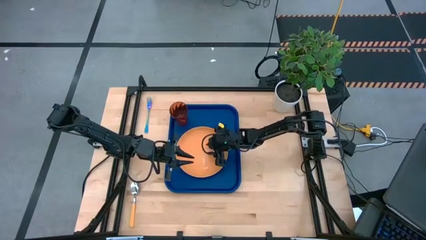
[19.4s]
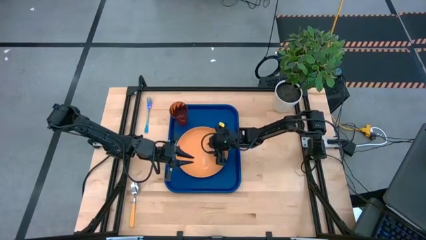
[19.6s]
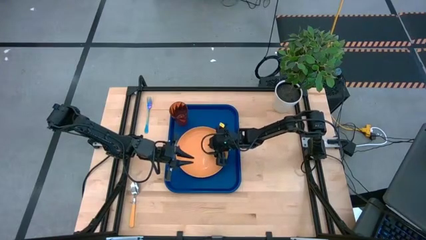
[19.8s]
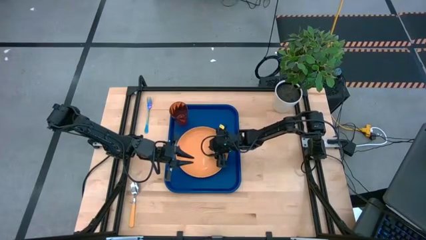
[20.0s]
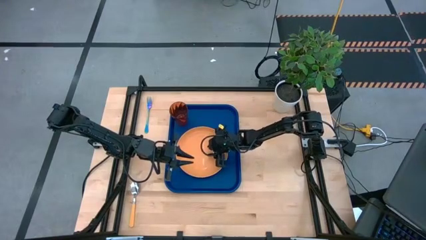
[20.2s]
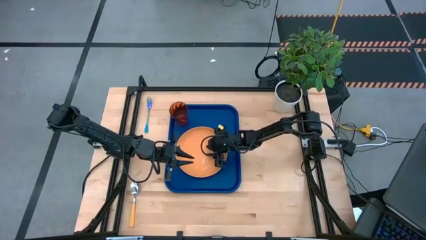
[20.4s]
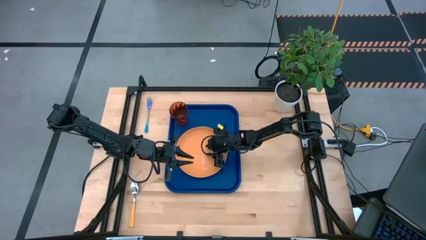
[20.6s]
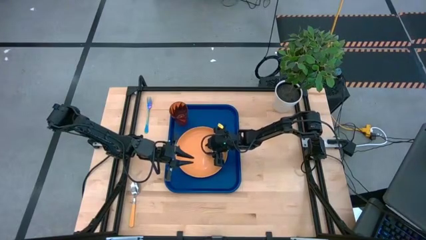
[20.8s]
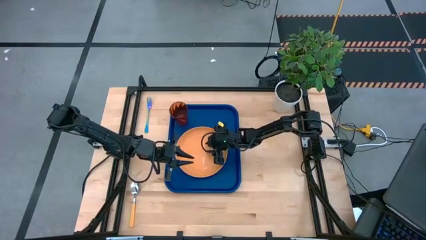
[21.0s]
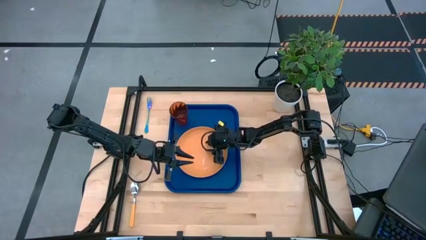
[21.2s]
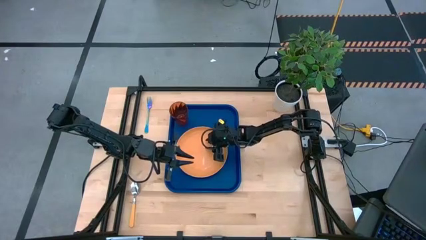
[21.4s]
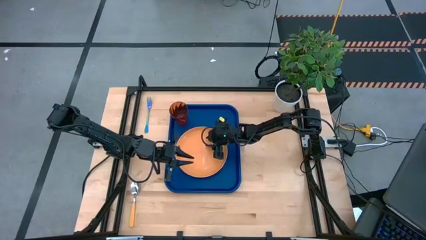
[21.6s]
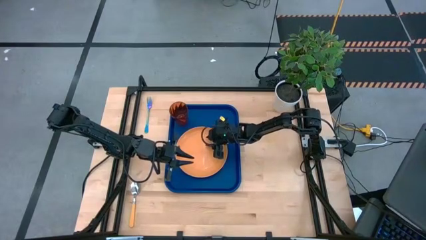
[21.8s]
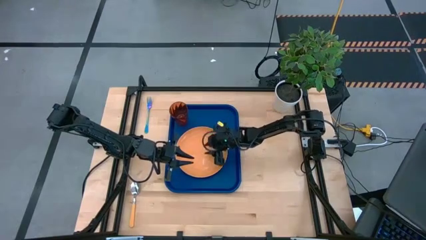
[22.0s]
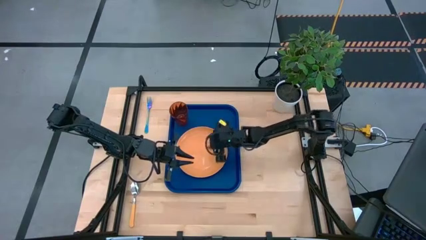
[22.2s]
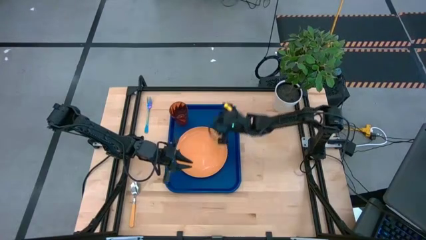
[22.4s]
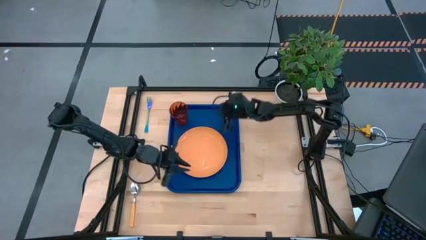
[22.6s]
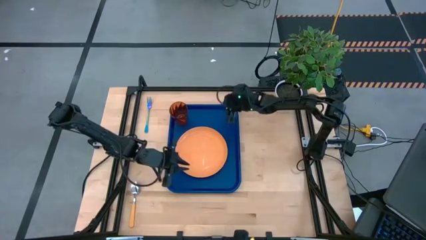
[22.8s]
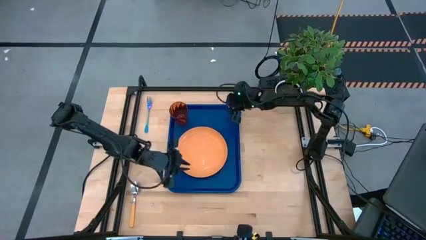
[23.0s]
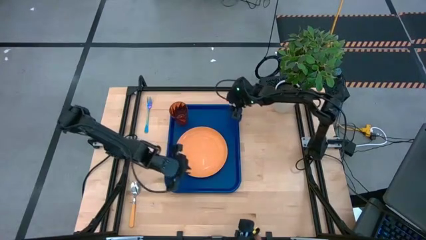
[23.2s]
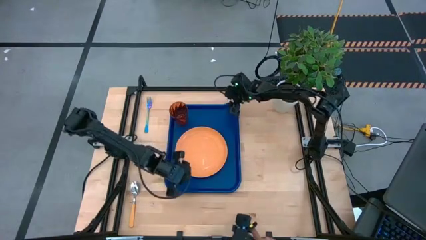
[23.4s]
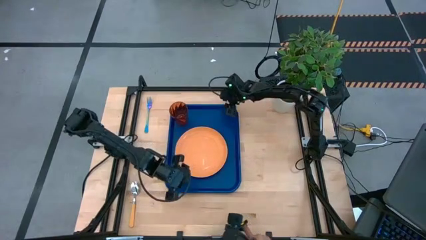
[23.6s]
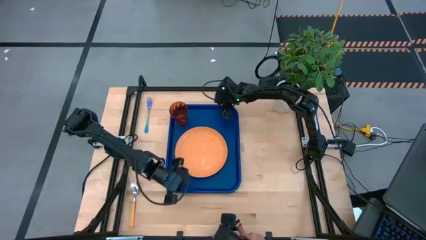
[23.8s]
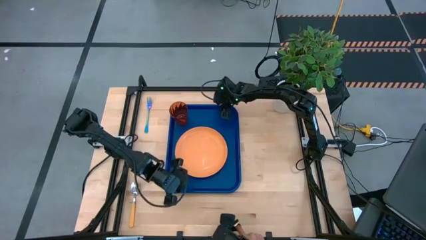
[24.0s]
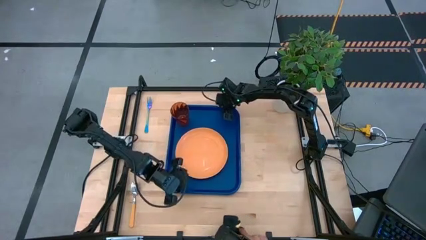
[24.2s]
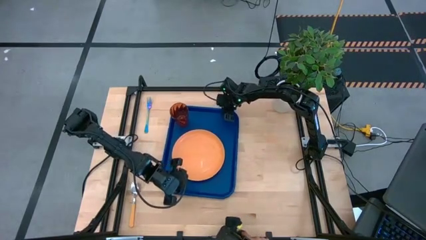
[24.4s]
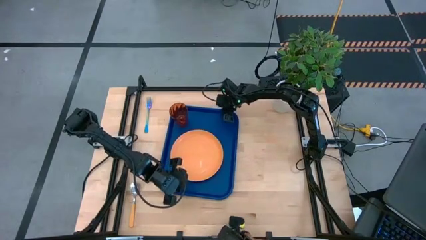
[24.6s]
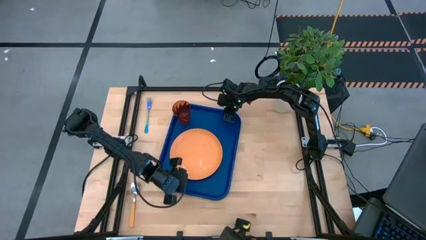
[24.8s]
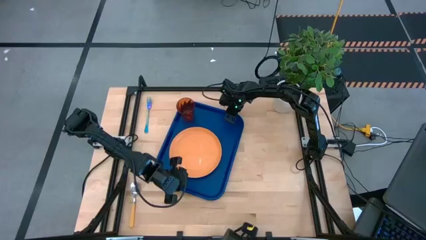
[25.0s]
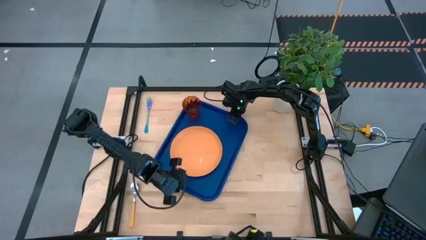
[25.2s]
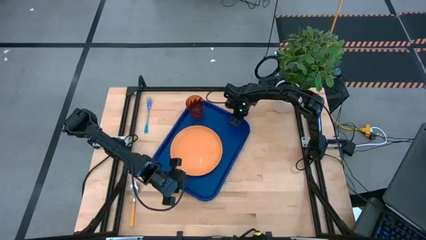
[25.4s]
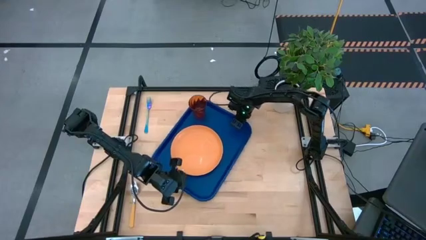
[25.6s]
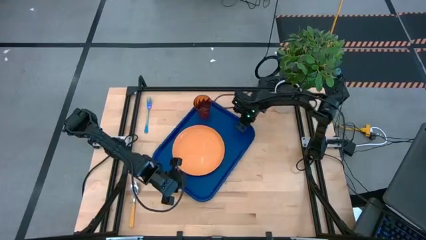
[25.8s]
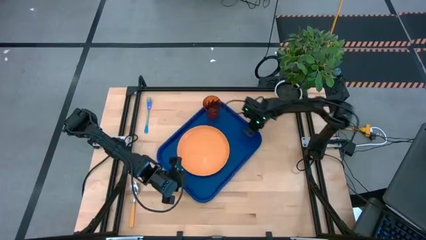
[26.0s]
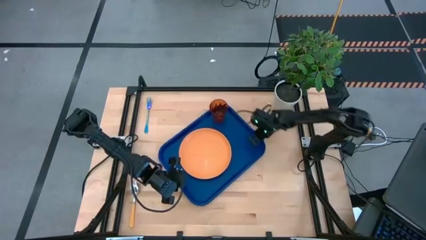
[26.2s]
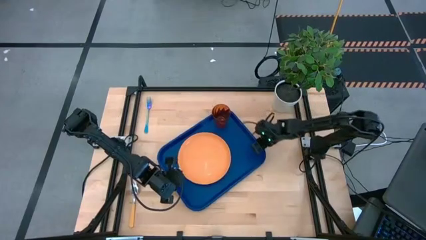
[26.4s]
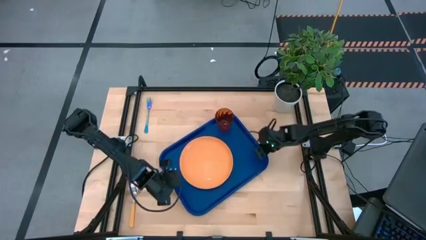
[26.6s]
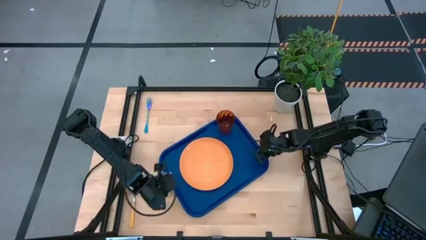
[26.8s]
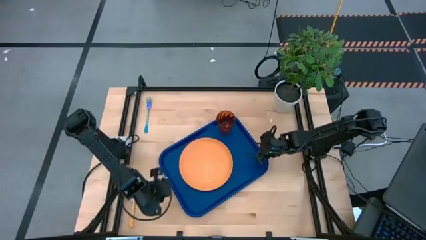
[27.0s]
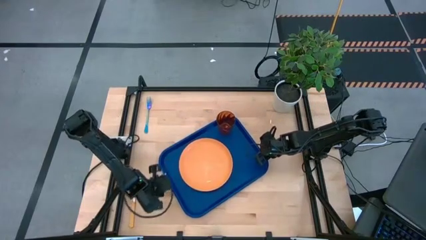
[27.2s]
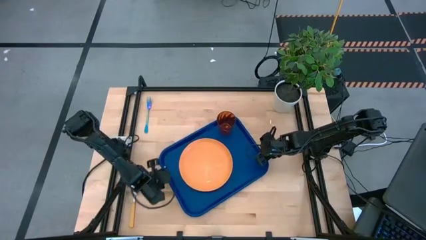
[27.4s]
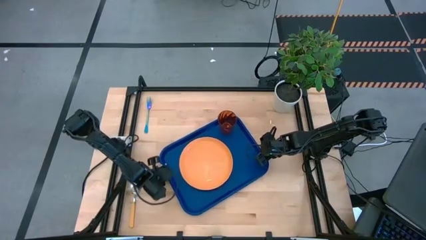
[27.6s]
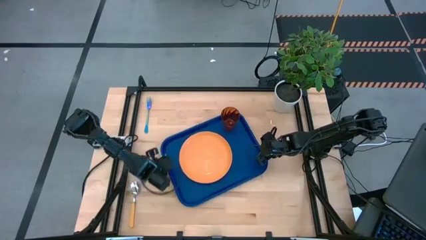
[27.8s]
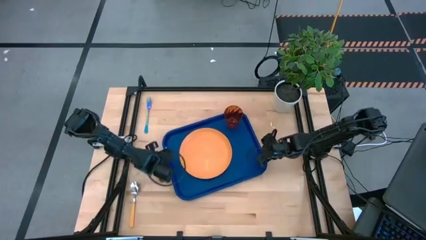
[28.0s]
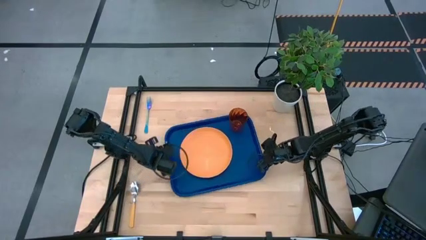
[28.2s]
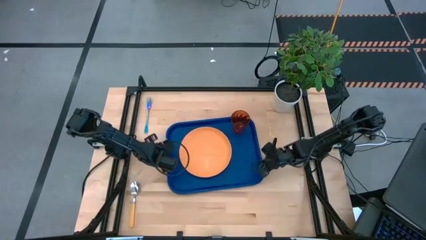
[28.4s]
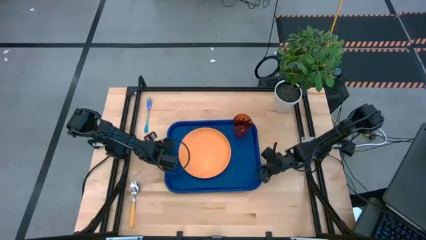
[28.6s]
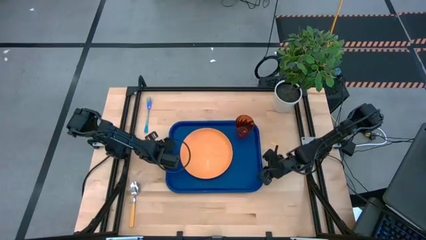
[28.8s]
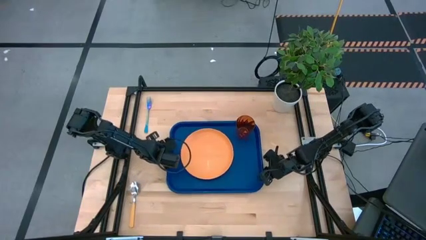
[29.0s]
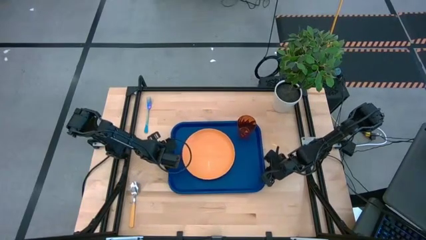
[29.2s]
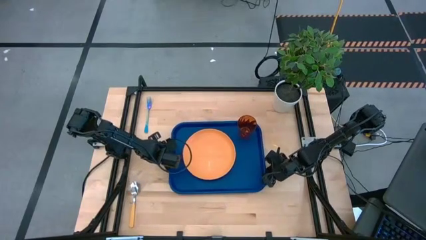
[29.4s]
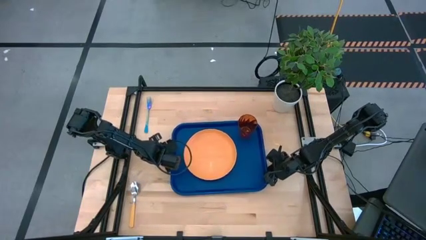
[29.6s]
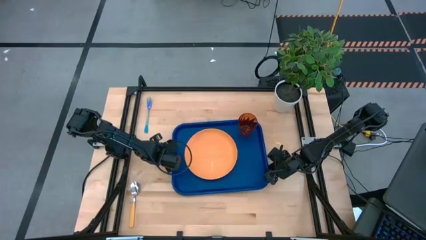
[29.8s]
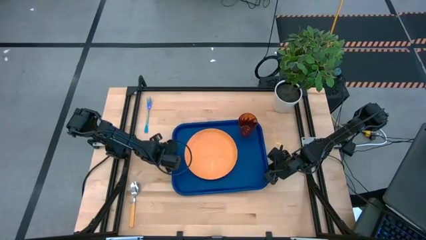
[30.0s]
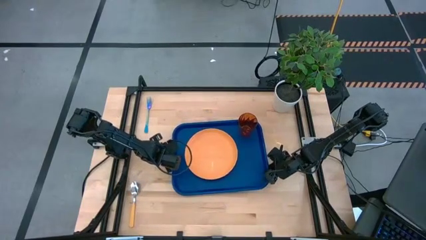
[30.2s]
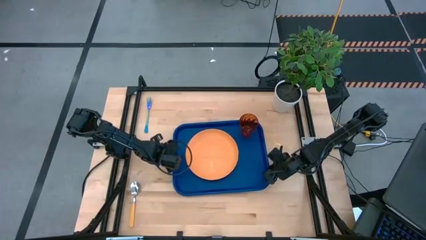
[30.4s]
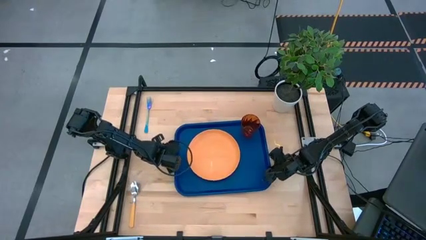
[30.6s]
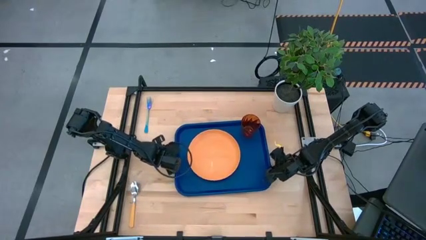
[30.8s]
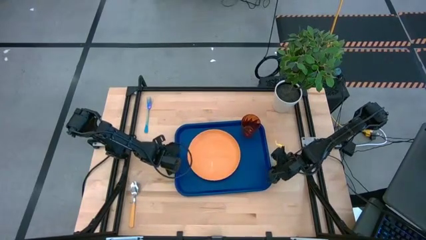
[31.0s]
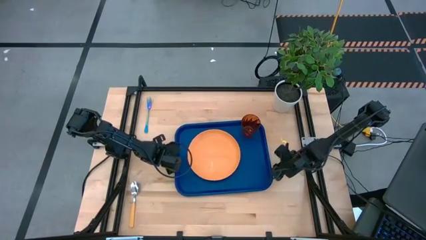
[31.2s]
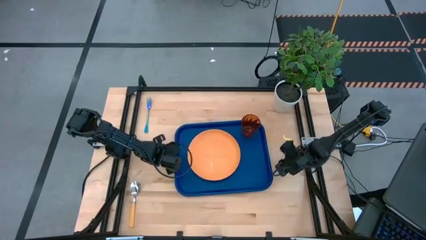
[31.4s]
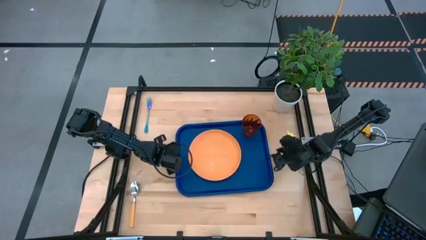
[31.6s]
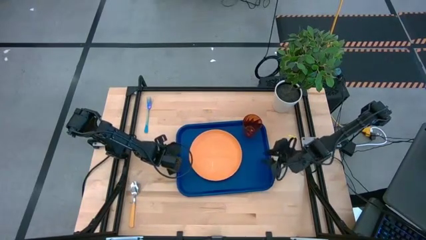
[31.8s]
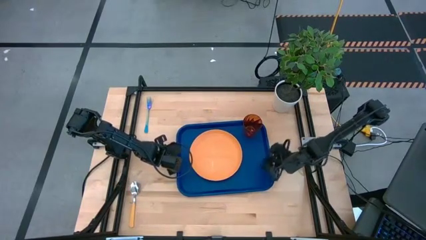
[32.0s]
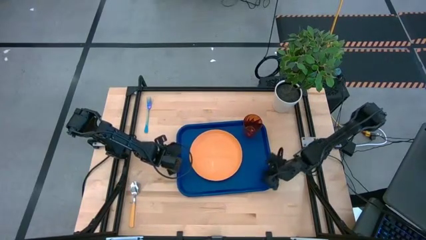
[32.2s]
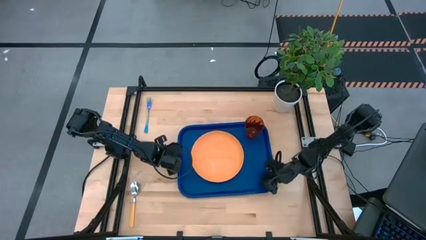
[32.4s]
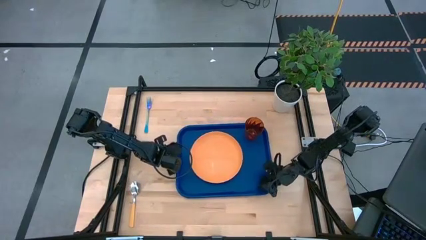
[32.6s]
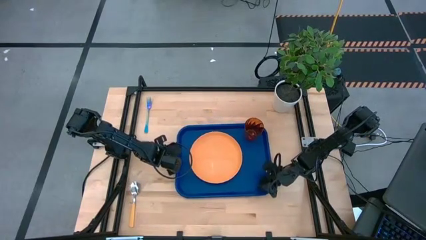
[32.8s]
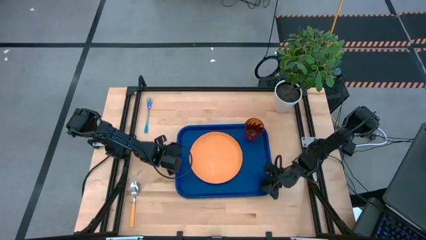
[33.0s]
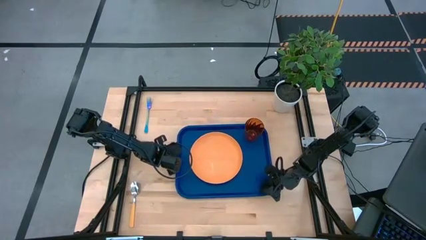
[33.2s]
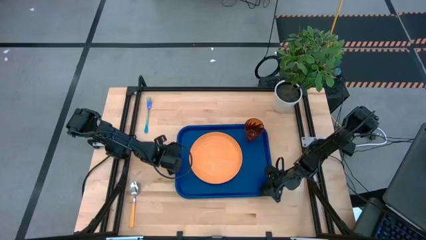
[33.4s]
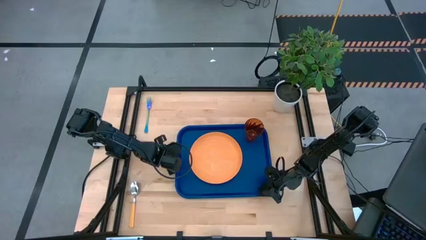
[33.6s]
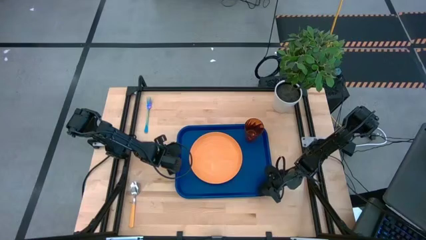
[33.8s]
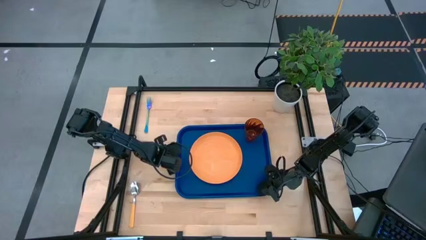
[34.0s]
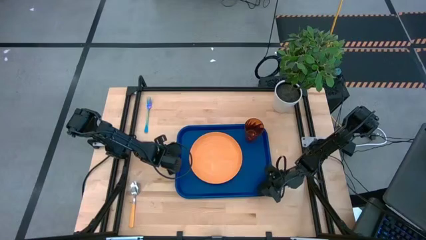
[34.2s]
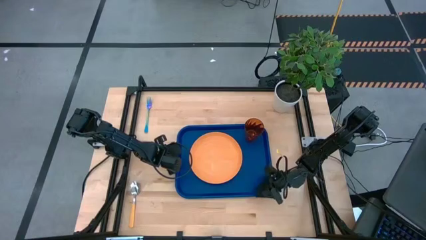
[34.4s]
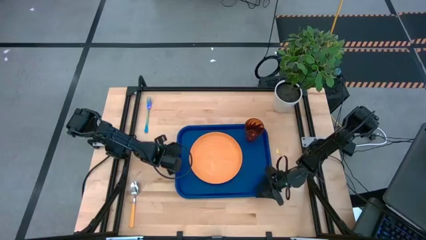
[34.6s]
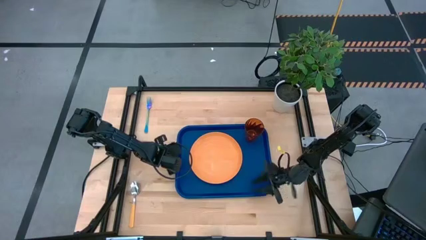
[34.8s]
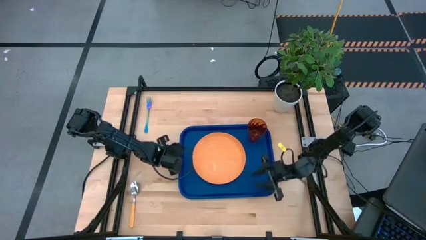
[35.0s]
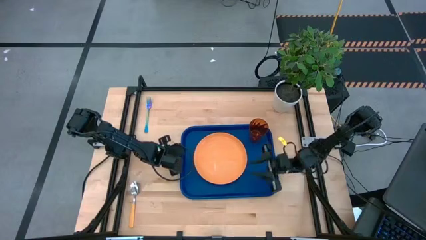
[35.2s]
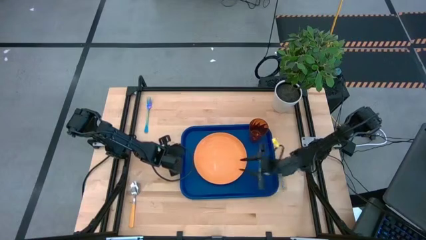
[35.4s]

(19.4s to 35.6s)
Task: Pick and place plate/cup/fork/spoon on tray
Adjust the blue tray

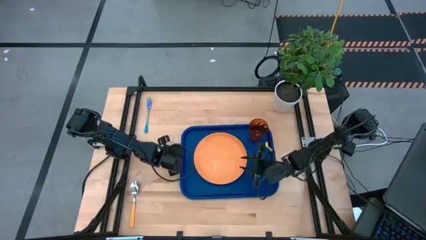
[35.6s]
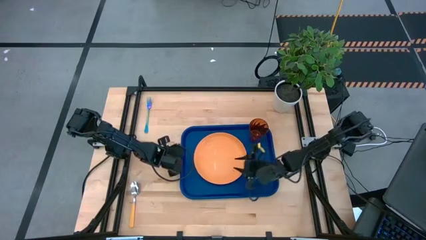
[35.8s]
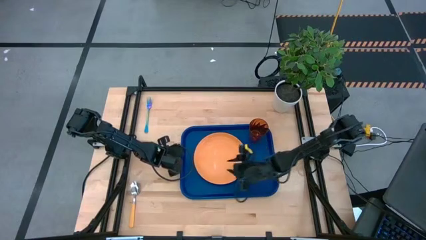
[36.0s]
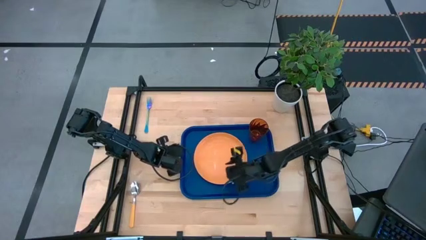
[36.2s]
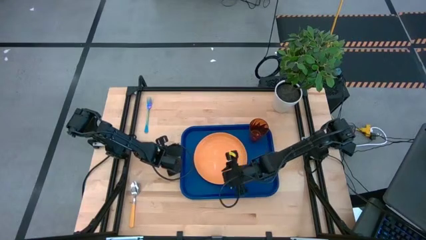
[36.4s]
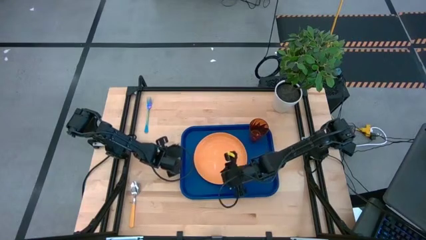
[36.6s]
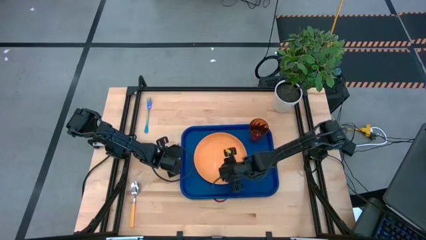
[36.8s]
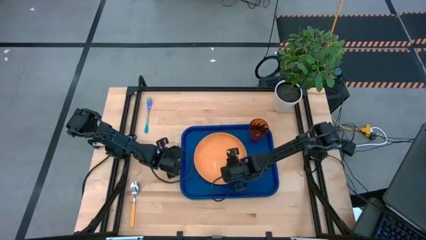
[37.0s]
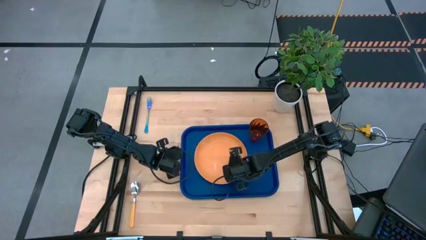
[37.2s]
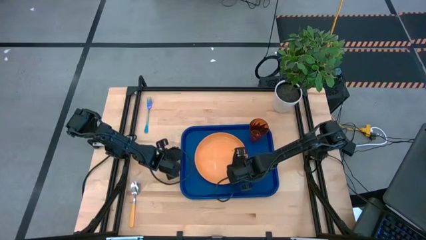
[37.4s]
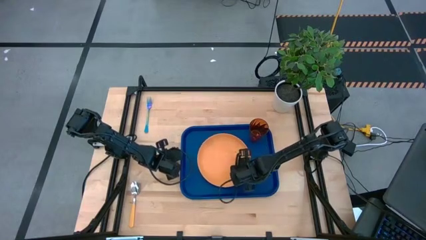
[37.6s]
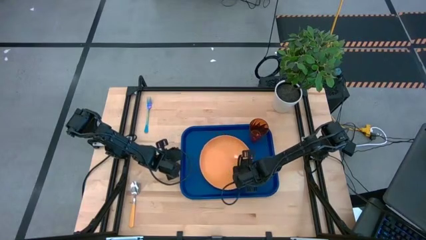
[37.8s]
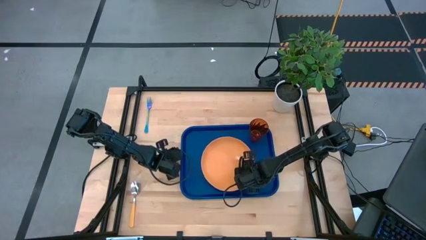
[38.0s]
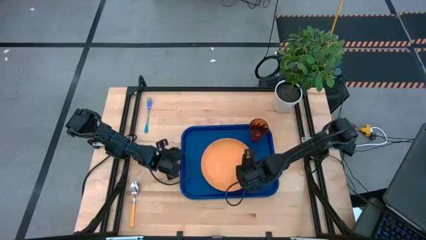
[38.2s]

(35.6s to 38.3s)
Adjust the orange plate on the blue tray
